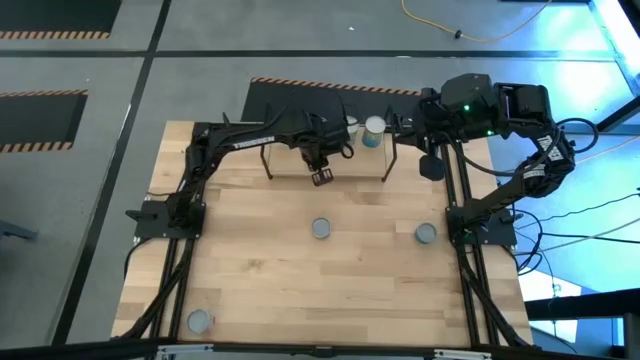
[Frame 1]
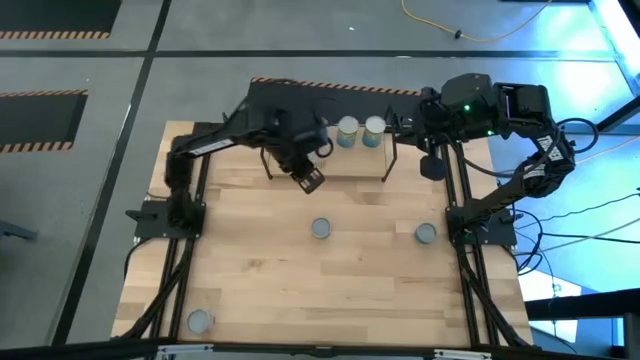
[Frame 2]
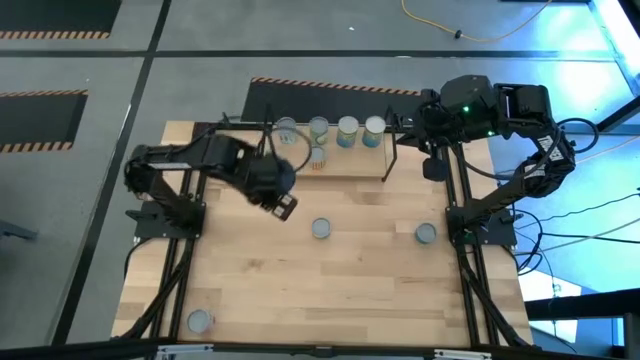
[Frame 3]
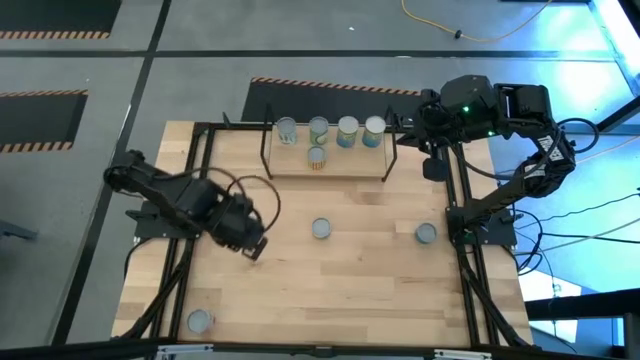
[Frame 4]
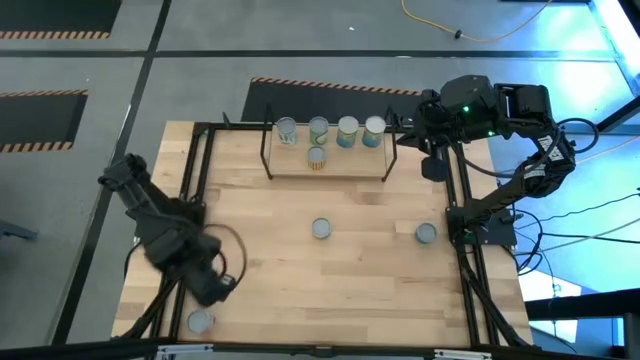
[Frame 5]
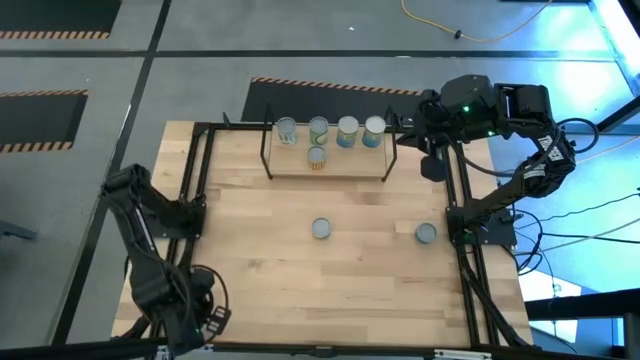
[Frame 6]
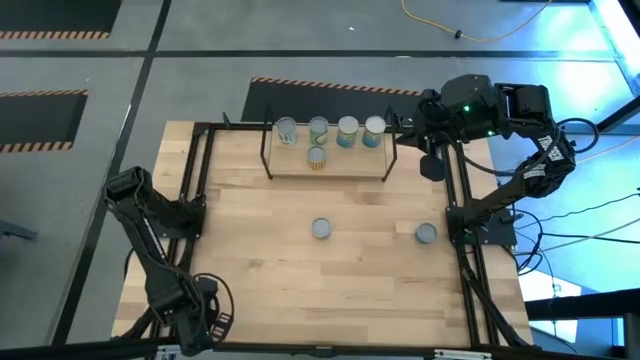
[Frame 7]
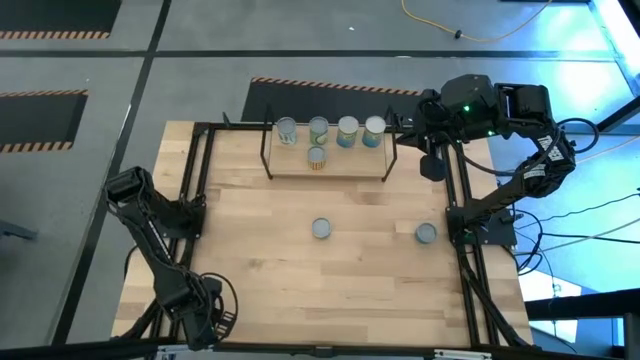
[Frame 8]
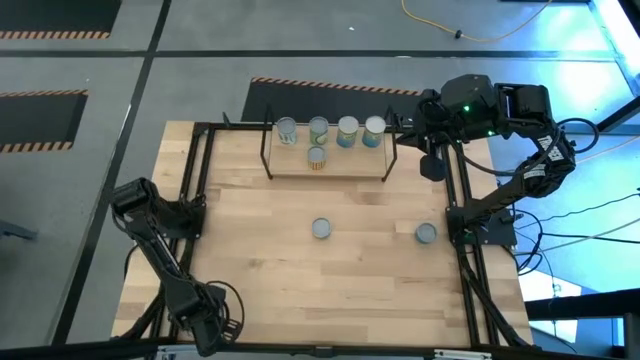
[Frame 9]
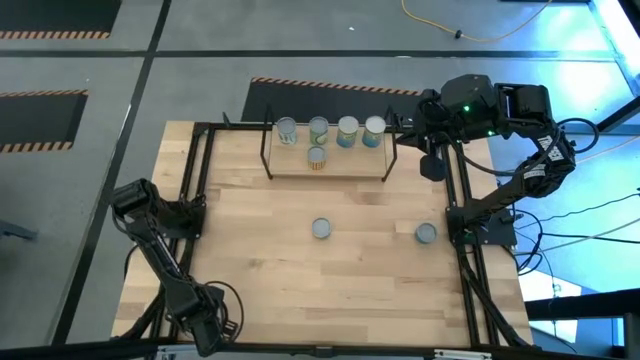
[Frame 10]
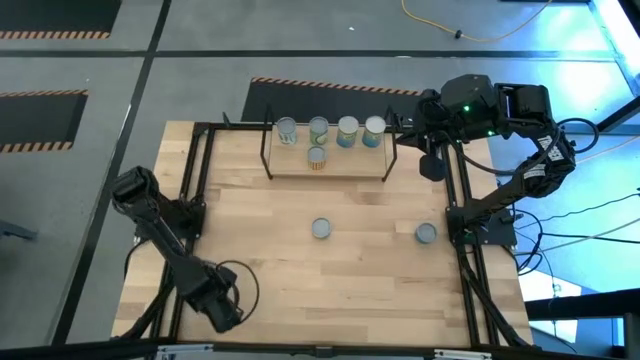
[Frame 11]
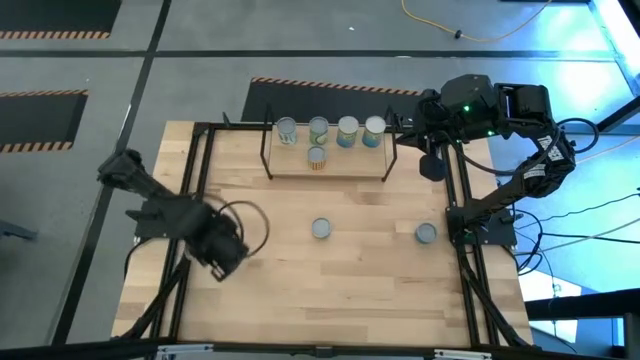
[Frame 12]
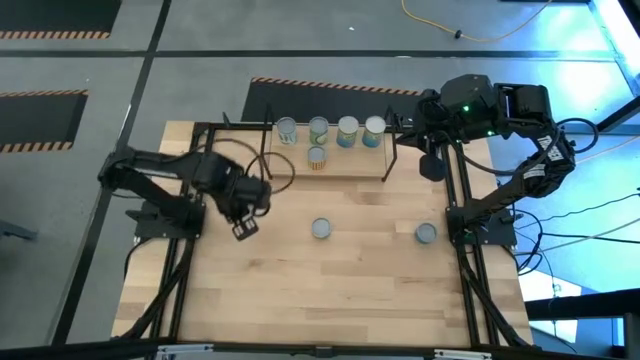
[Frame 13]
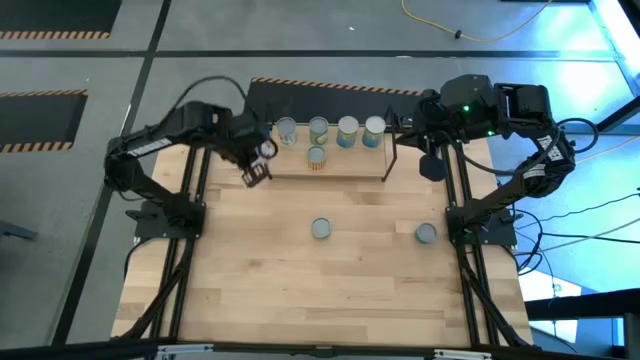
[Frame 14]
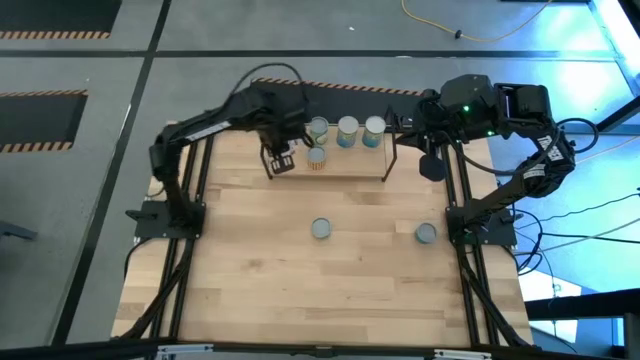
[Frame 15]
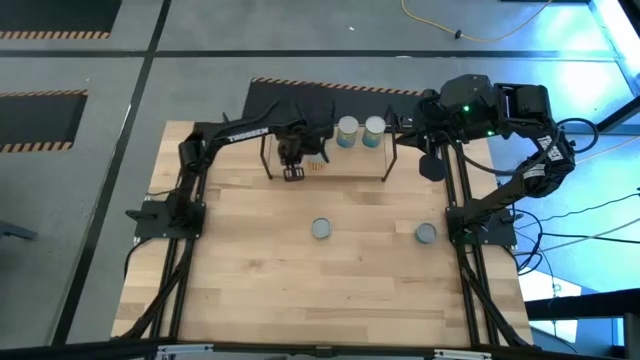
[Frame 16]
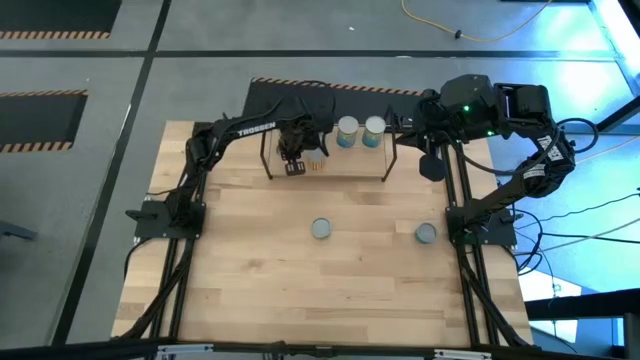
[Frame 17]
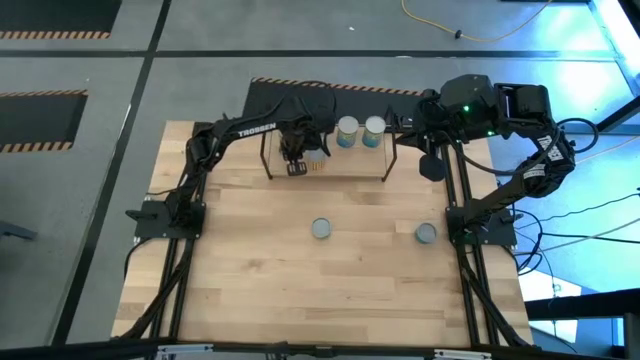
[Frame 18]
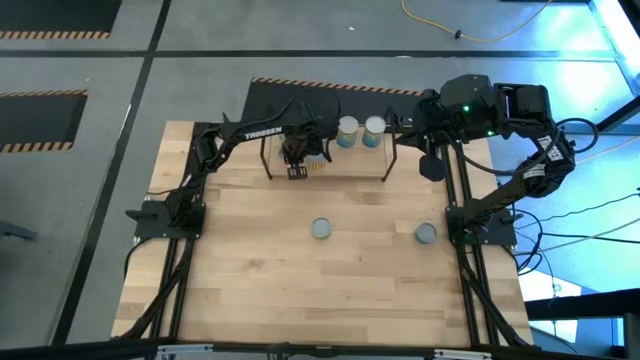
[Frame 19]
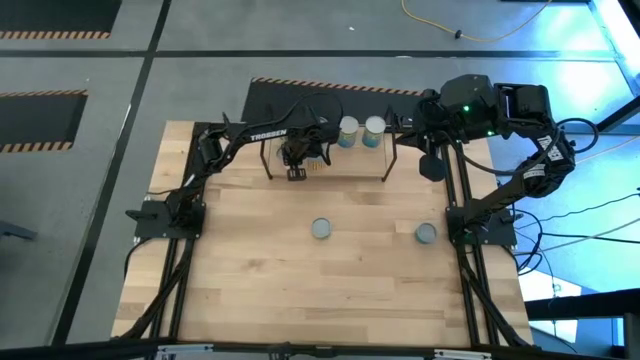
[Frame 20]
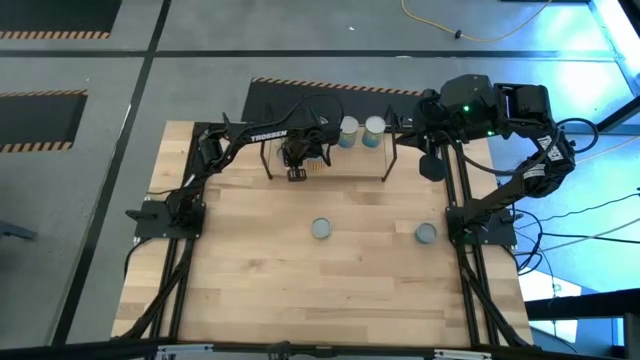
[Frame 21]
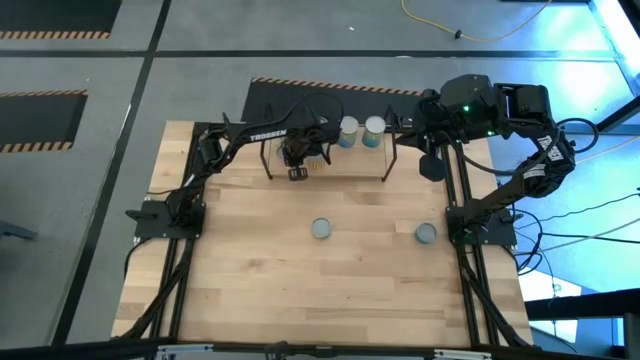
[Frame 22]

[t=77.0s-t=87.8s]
Task: Pick and place cans onto a shelf
Put the light red on the shelf aligned with the white can

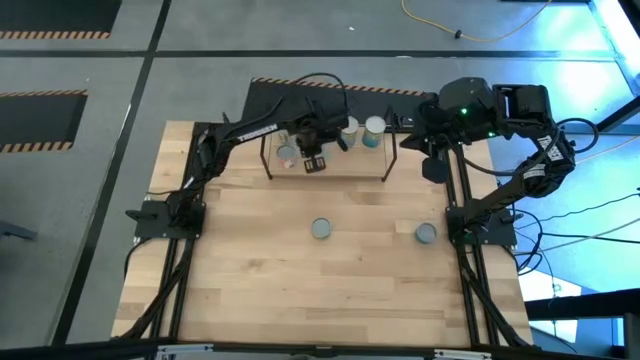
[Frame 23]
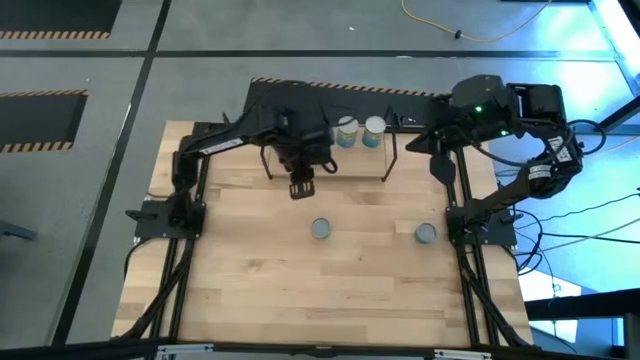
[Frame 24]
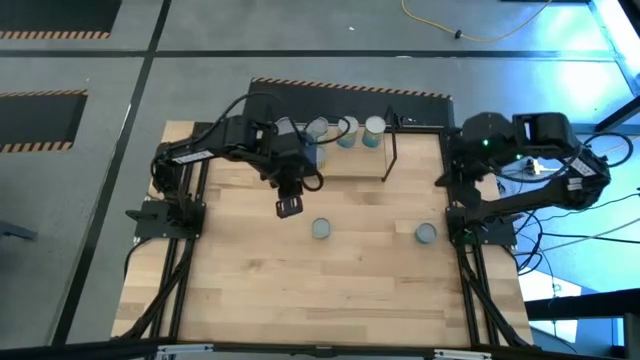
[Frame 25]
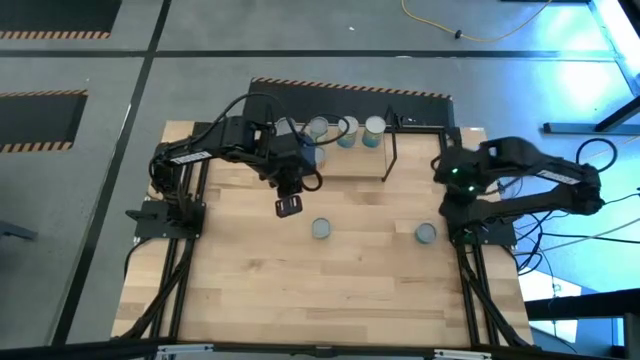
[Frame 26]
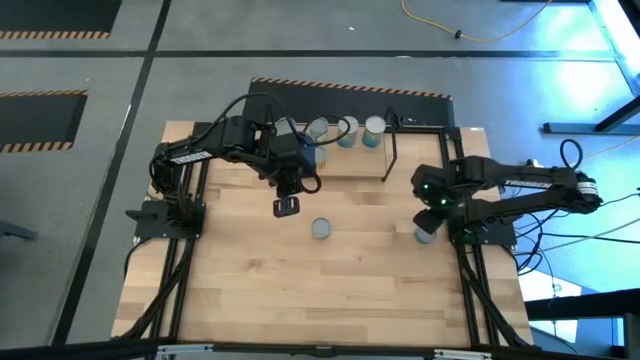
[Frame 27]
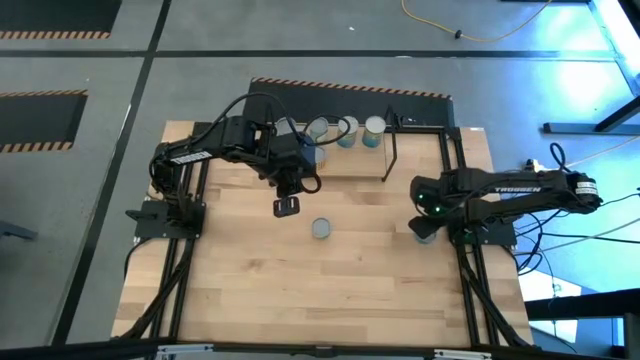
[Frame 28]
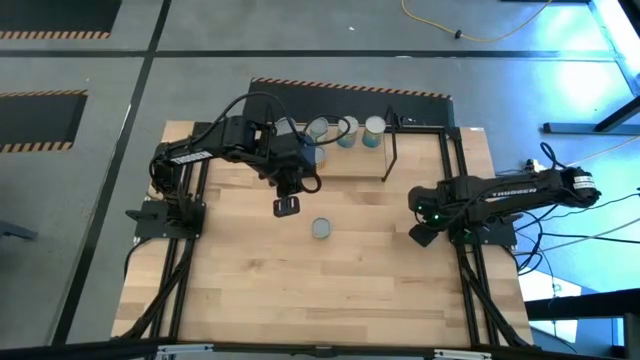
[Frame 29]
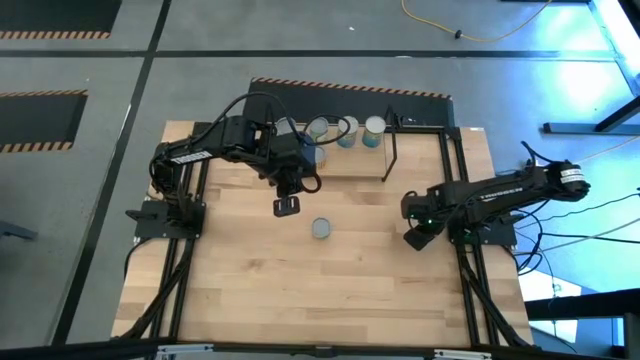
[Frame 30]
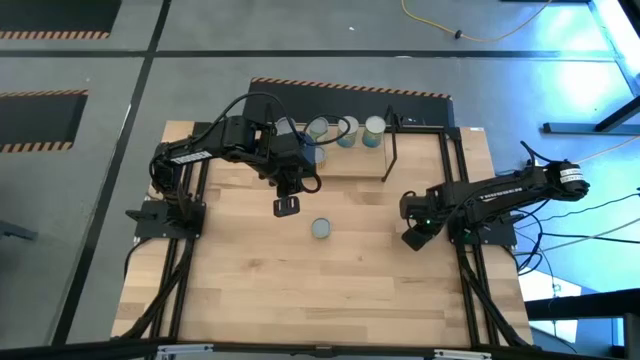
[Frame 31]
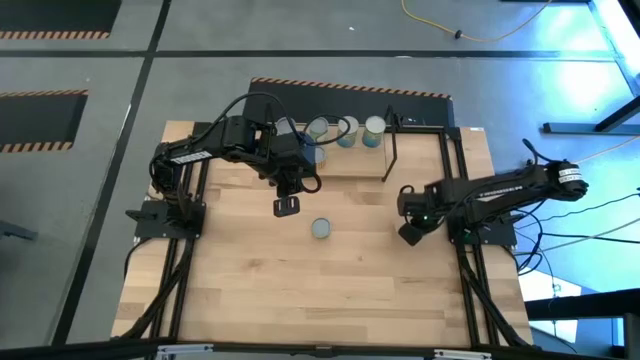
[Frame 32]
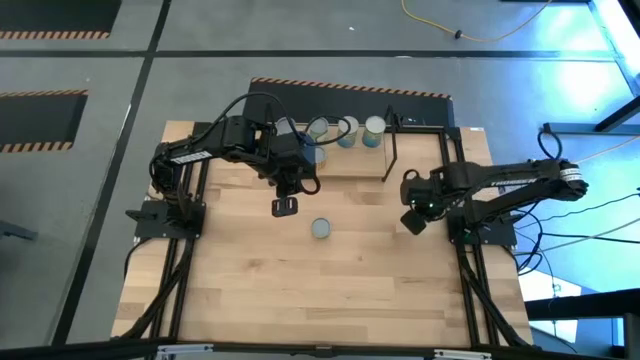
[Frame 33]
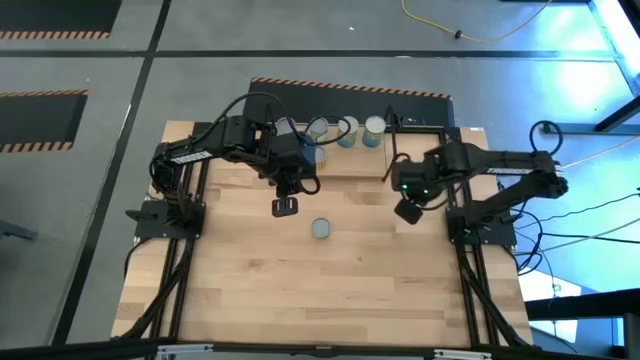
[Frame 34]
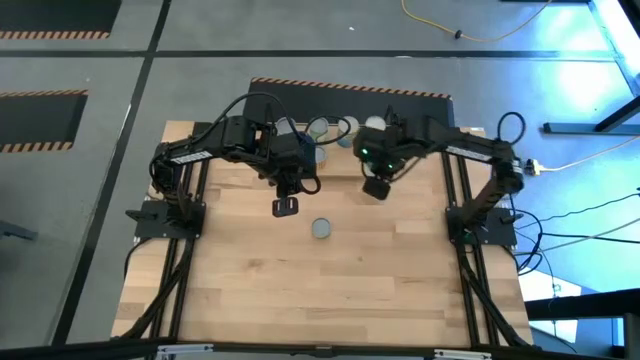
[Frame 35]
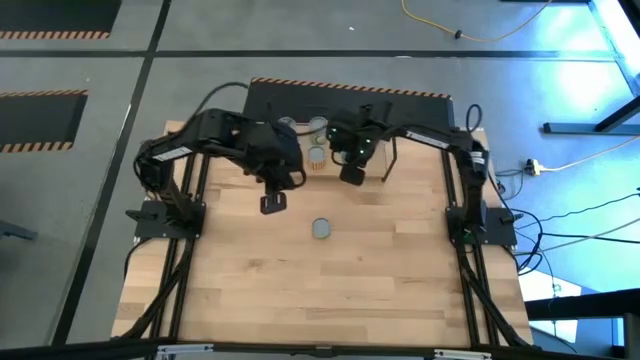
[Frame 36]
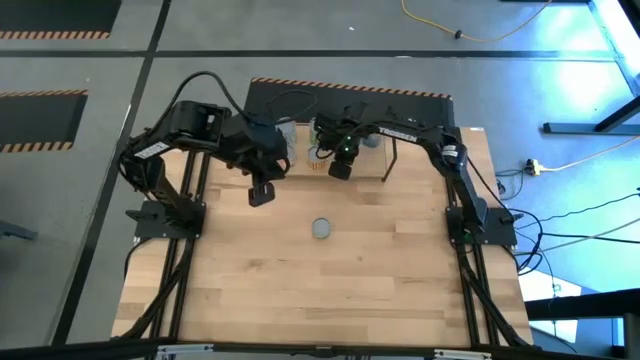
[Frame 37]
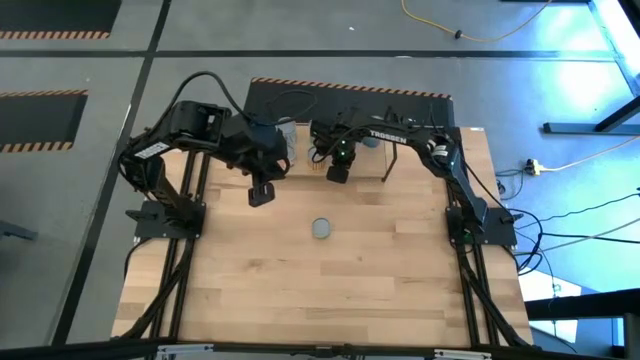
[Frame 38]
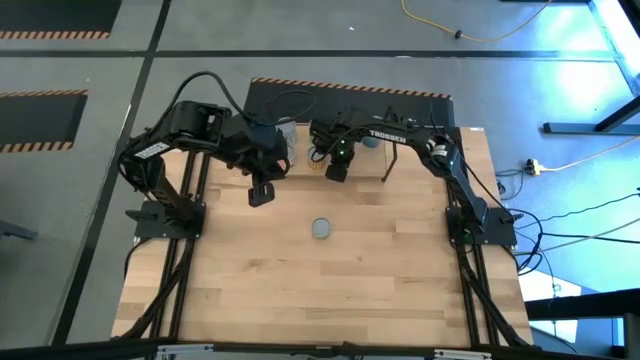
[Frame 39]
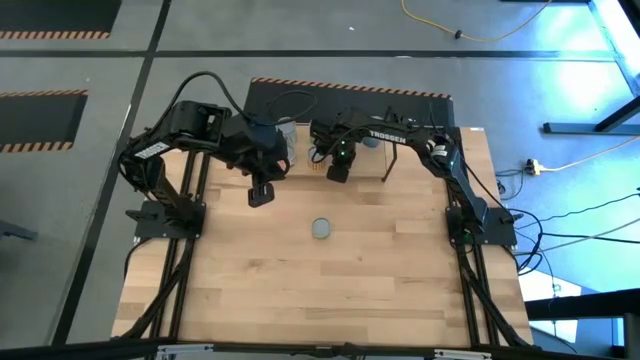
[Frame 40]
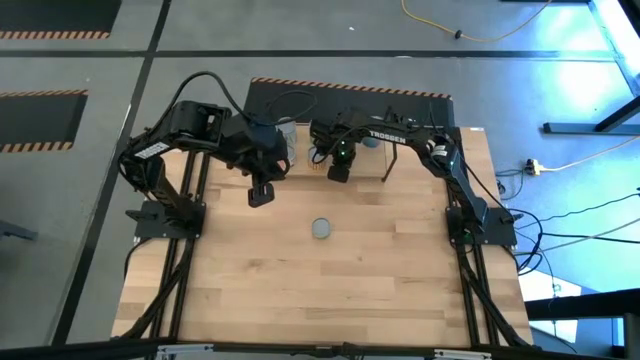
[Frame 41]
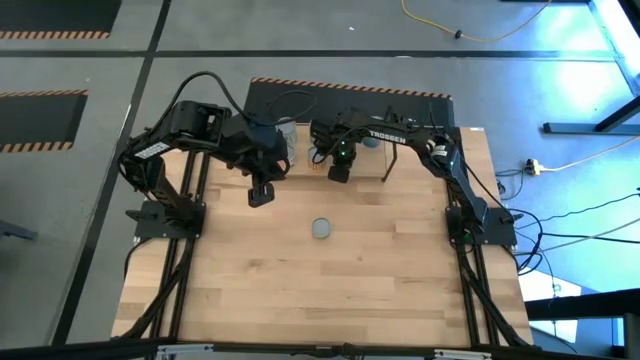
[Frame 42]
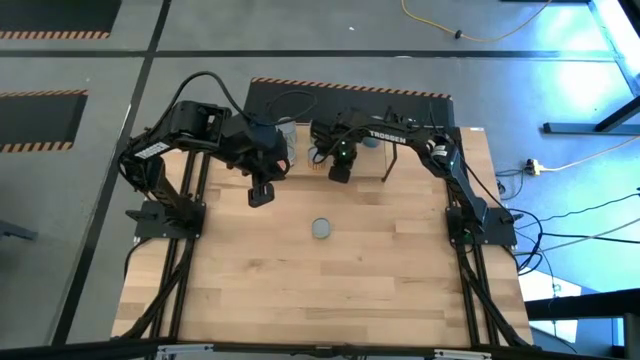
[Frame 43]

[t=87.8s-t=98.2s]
Put the light green can on the shelf aligned with the light blue can
